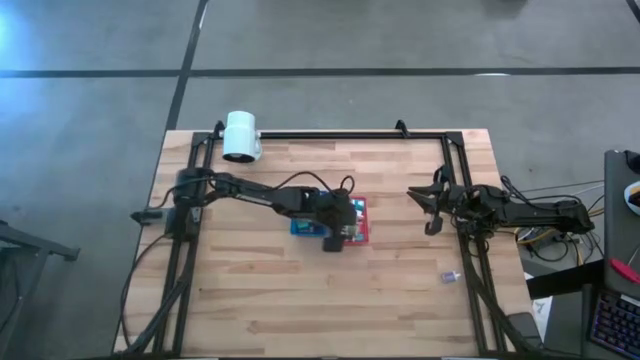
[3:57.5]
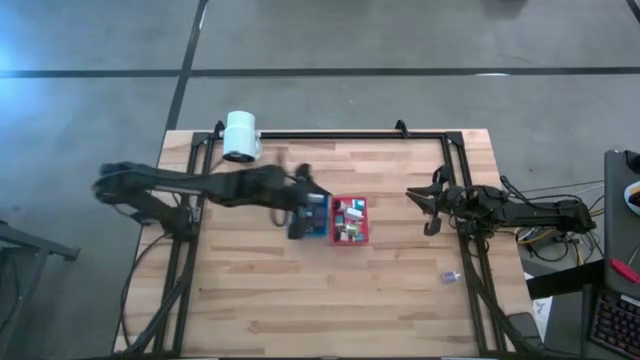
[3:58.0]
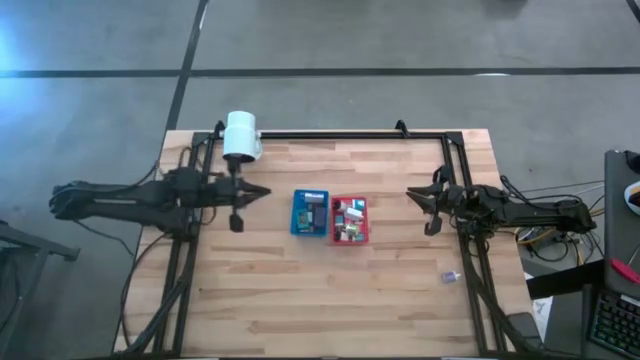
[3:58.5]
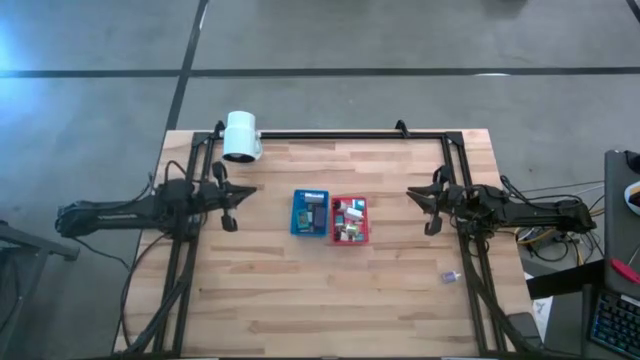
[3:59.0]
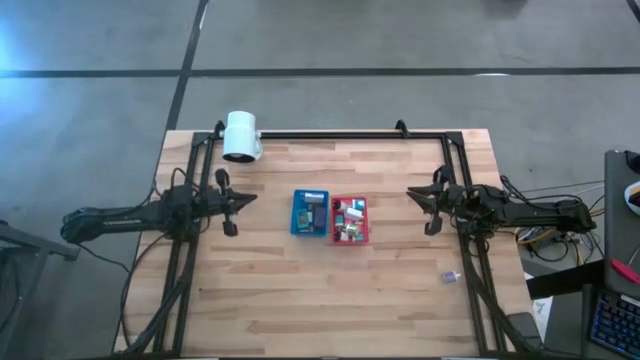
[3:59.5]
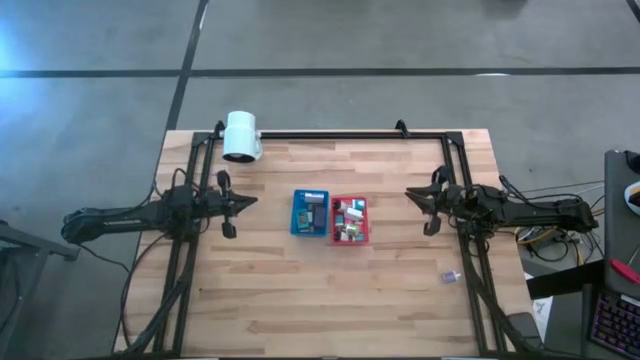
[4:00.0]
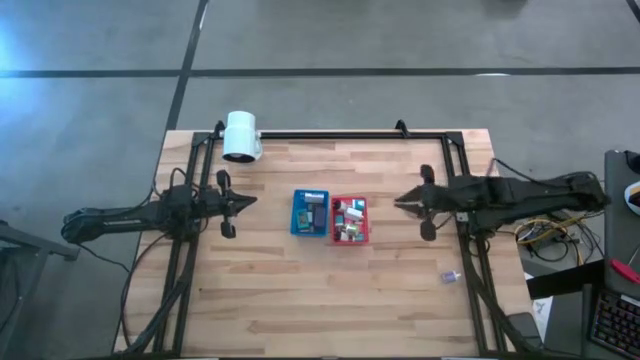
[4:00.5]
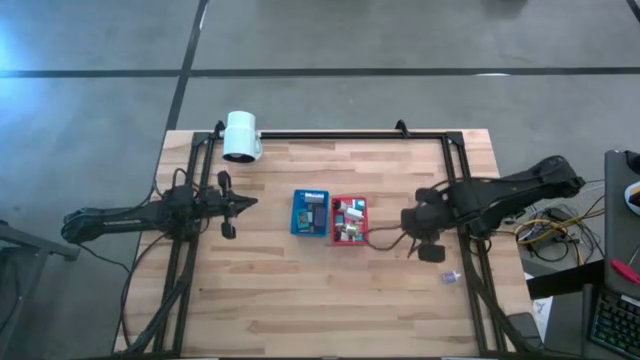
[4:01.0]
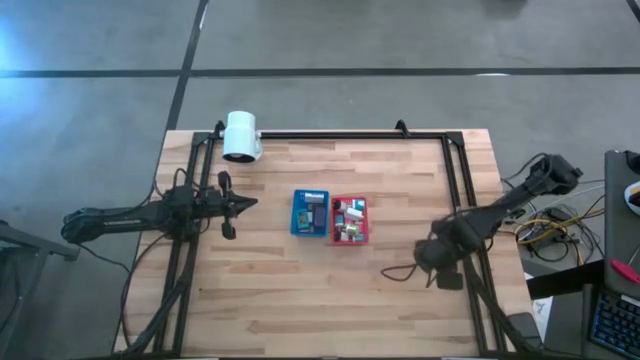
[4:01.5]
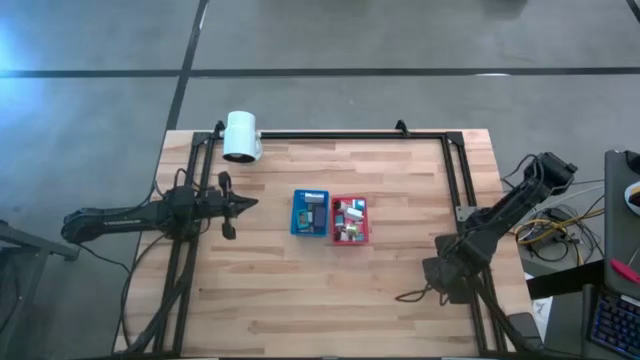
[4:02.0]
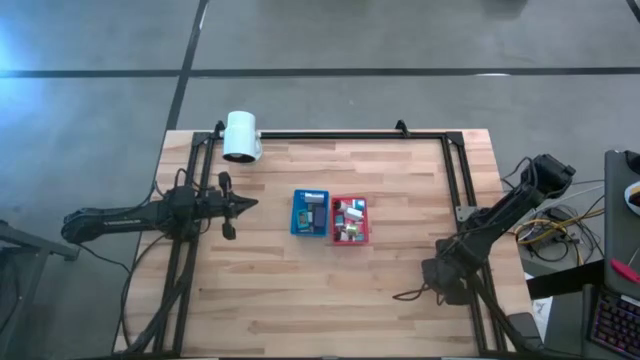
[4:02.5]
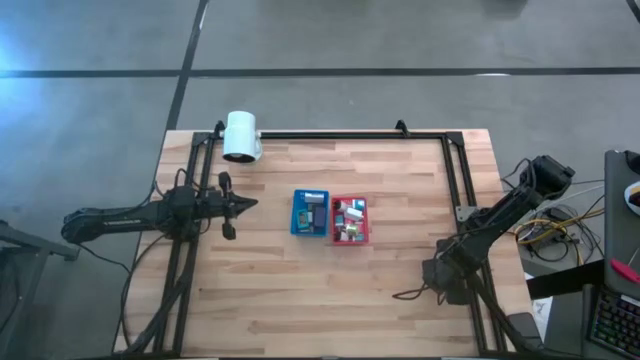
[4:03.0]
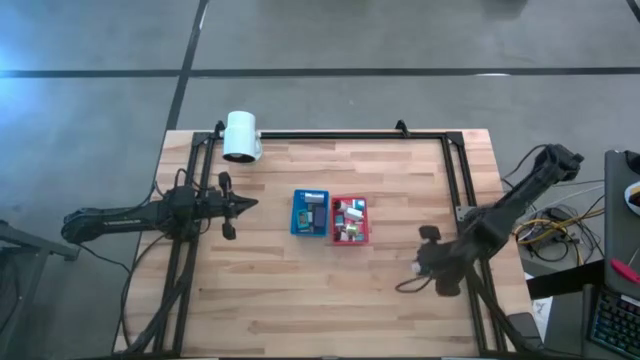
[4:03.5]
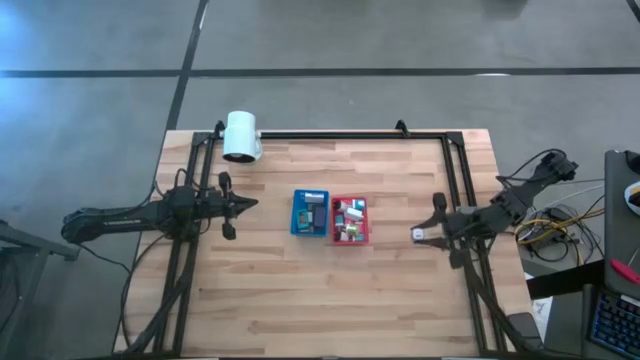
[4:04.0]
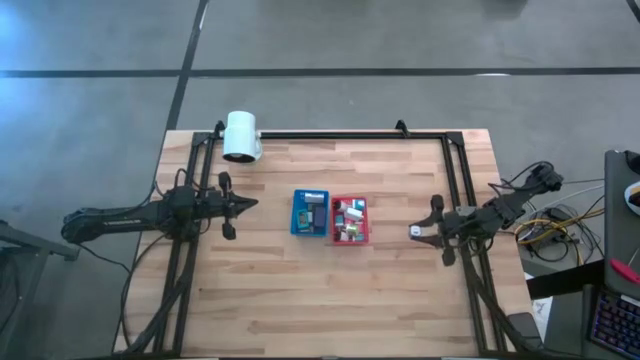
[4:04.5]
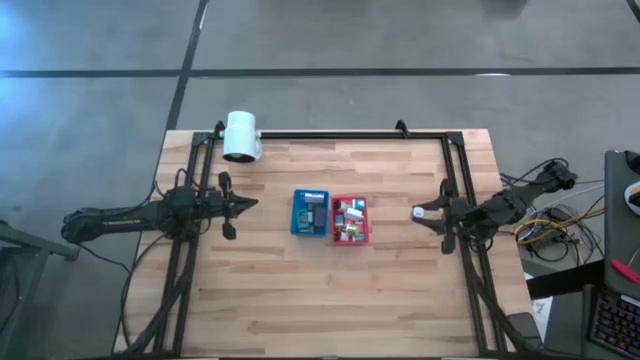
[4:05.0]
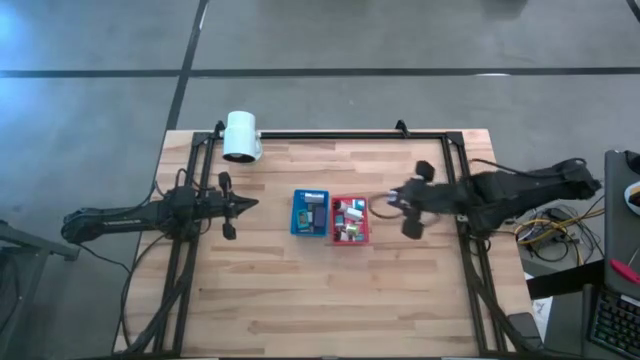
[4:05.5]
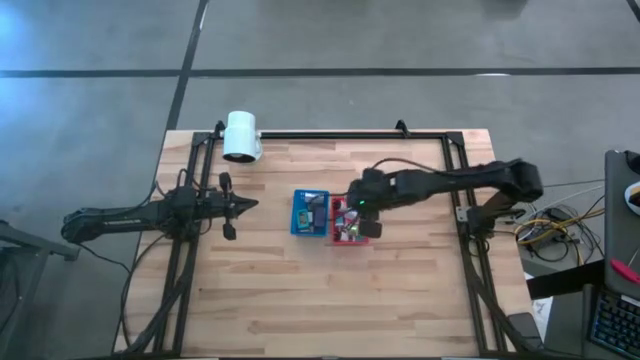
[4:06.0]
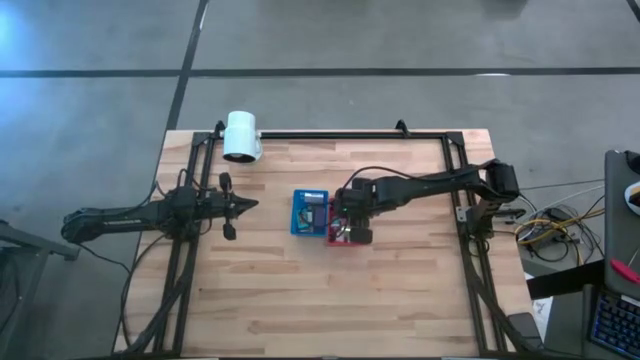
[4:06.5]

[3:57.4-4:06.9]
Task: Pick & Place Office items
Put the purple adaptor into the red bin

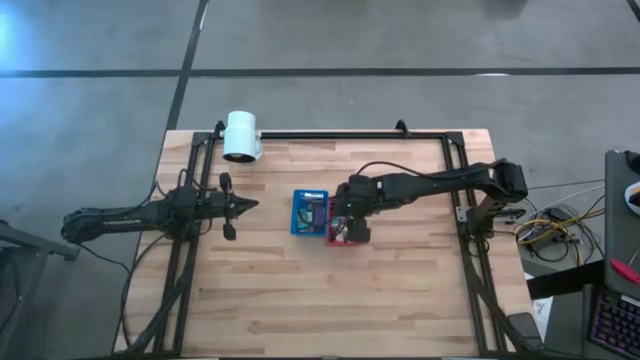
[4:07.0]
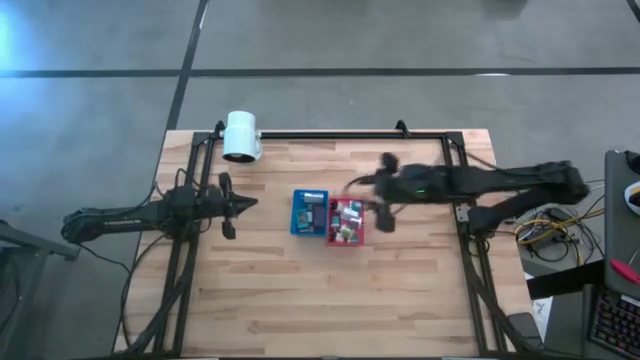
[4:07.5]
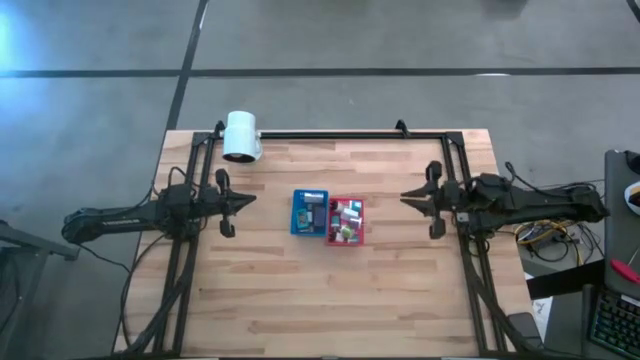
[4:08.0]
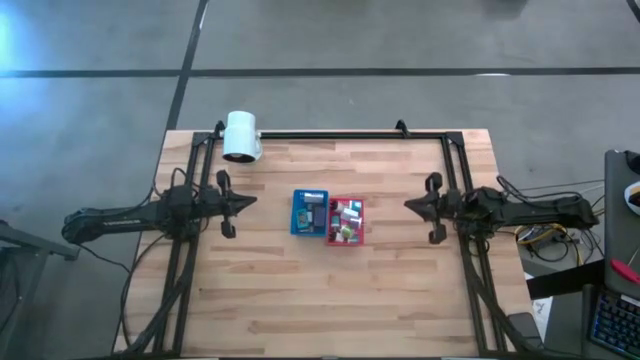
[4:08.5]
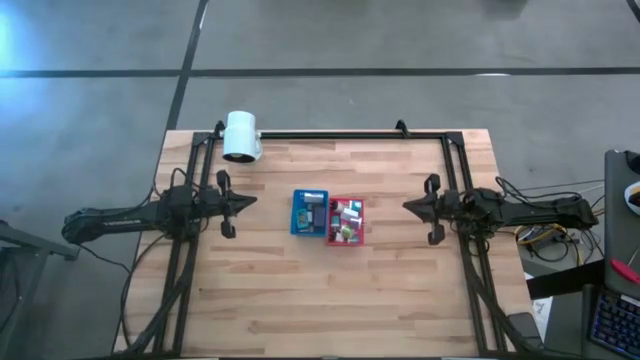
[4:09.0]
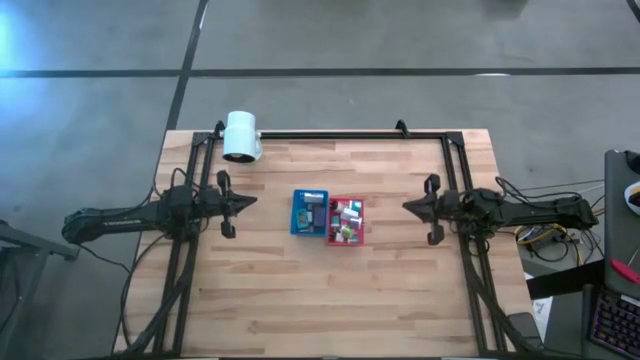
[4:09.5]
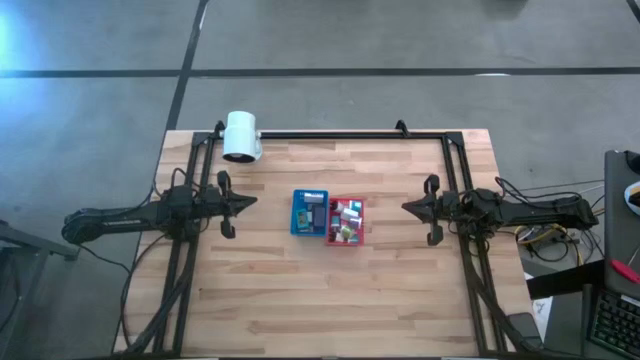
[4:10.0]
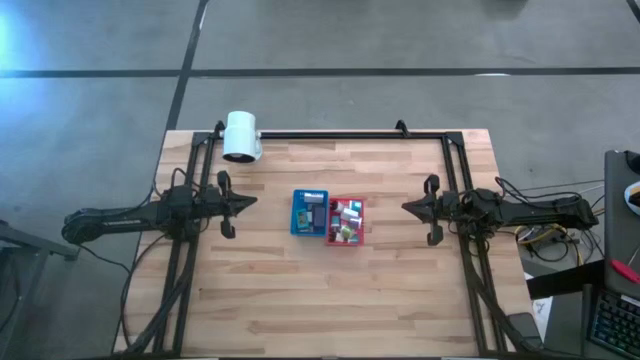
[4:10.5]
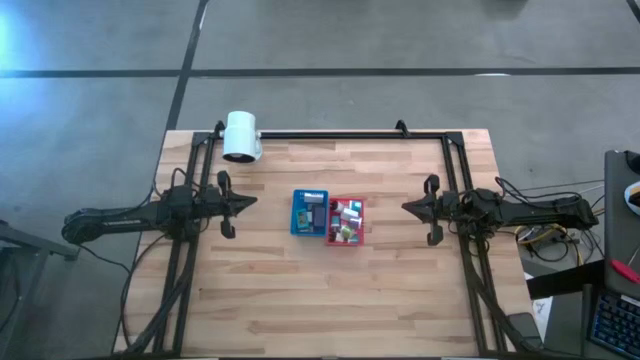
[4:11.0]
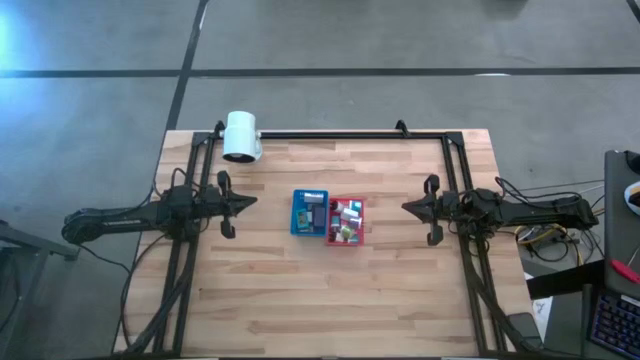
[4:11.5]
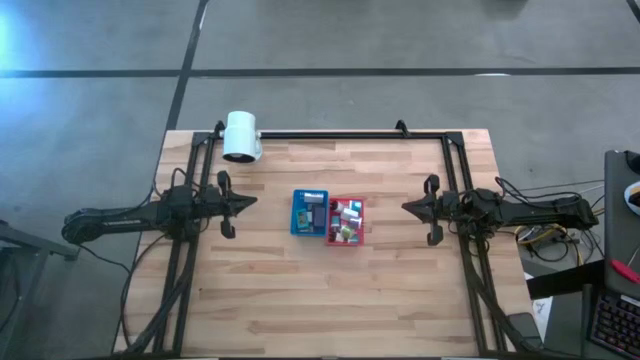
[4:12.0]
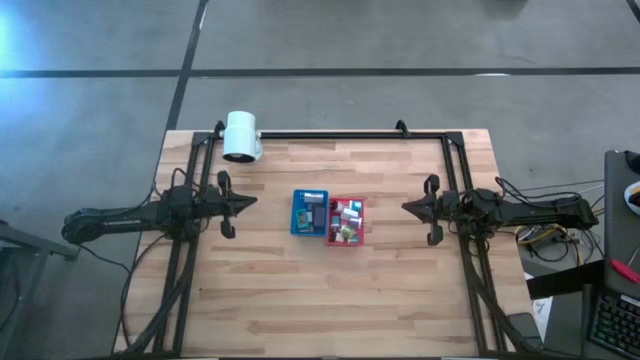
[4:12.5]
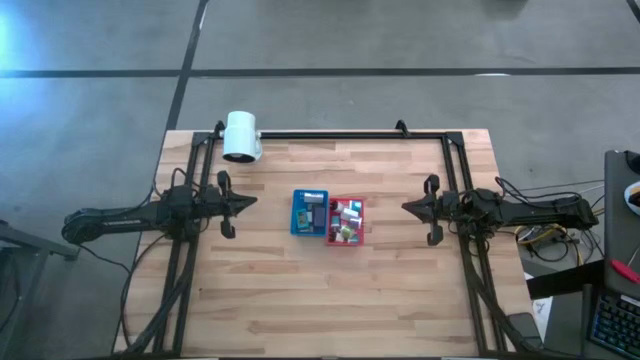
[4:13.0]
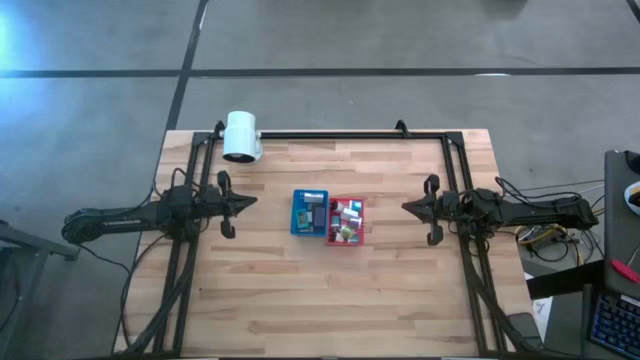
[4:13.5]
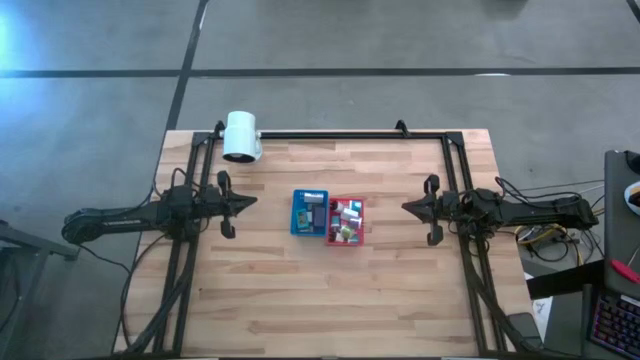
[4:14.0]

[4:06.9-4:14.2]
Return to Home Position

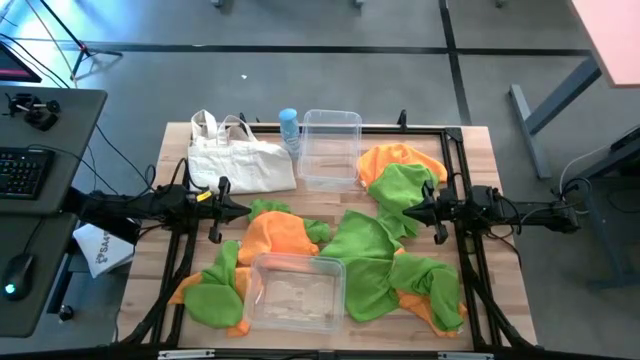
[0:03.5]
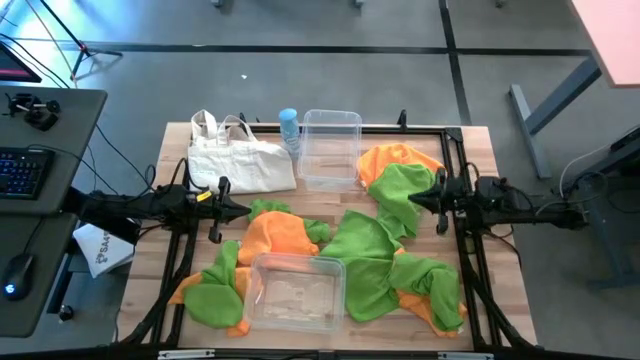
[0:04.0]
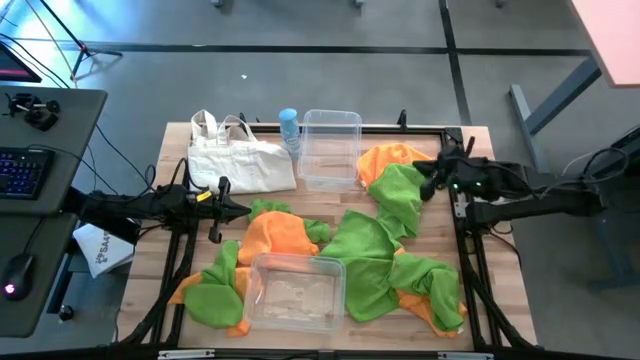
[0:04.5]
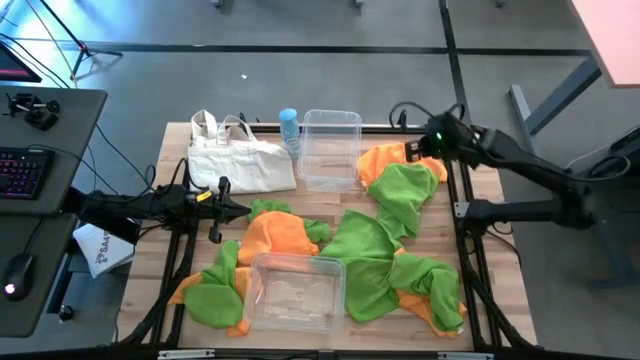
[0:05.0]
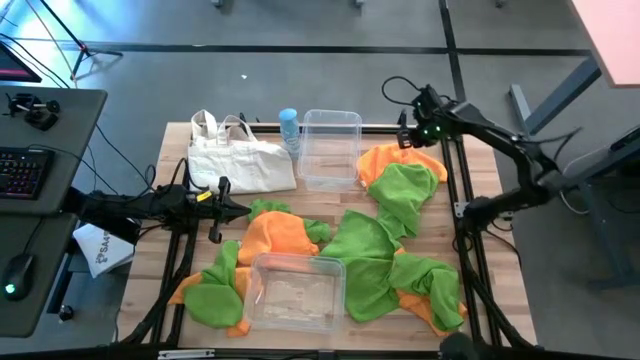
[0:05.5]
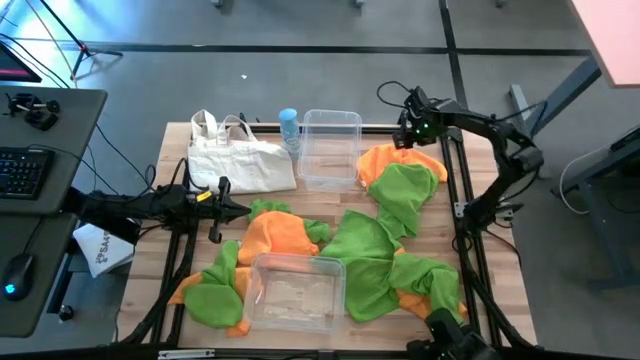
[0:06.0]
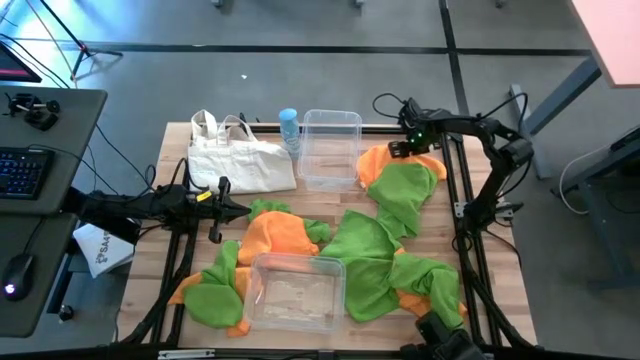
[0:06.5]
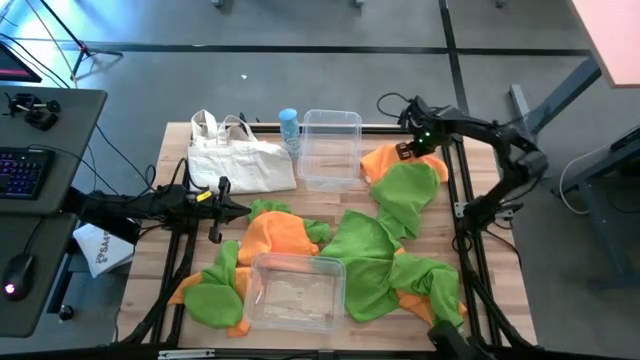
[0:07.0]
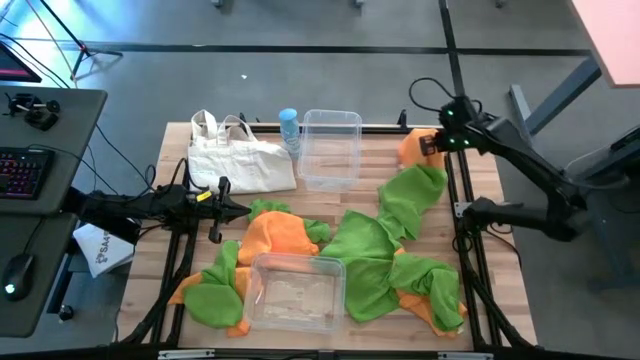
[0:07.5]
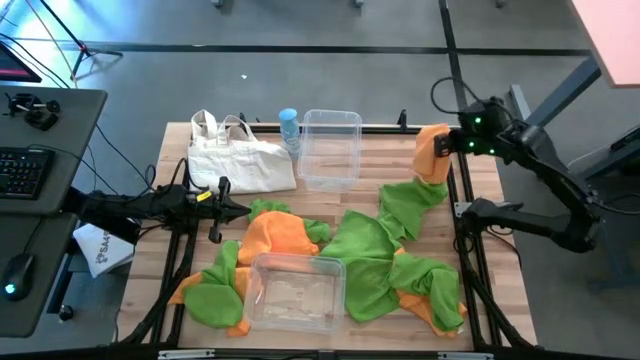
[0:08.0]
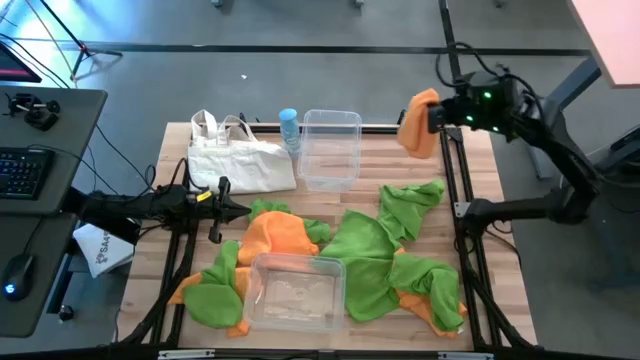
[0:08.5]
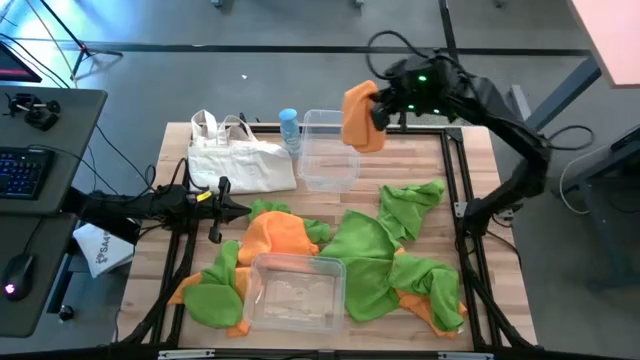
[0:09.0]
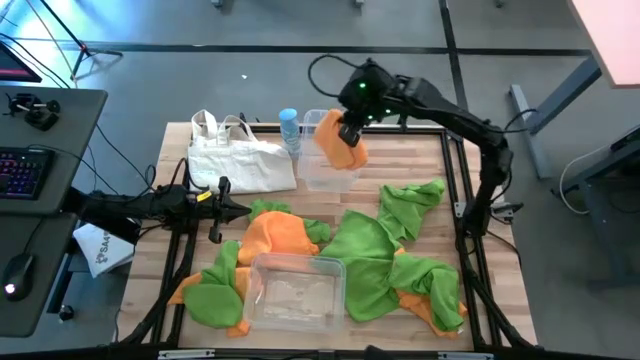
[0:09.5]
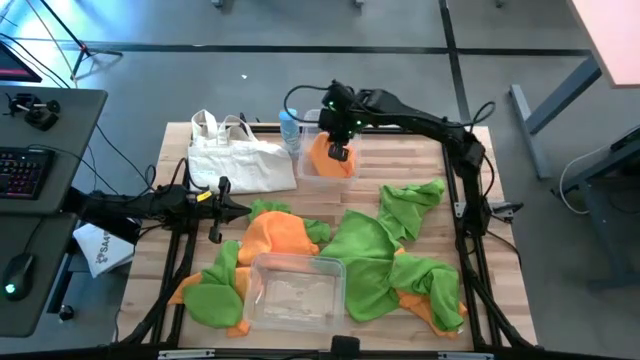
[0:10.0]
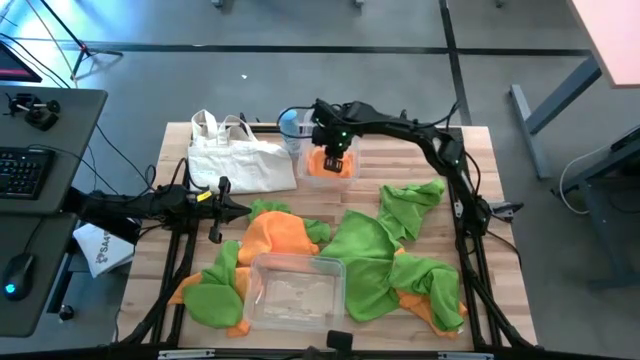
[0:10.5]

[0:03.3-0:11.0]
Task: Sort microfiber towel by color & place in baskets
Put the orange microfiber cloth into the top transparent bin
